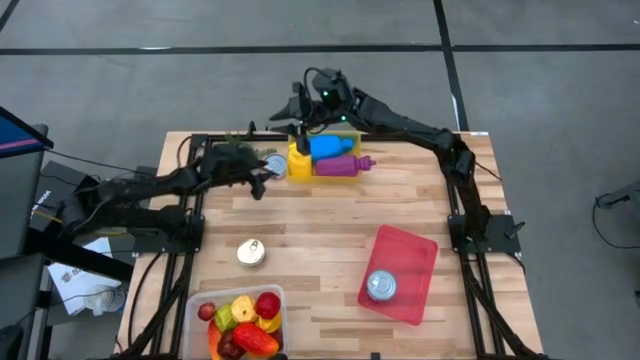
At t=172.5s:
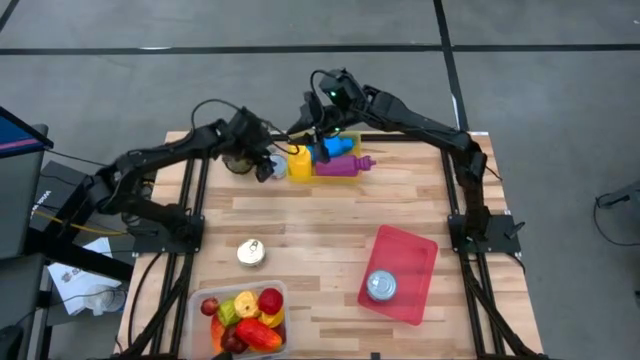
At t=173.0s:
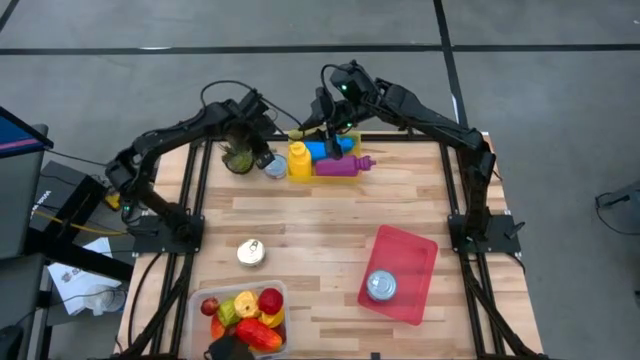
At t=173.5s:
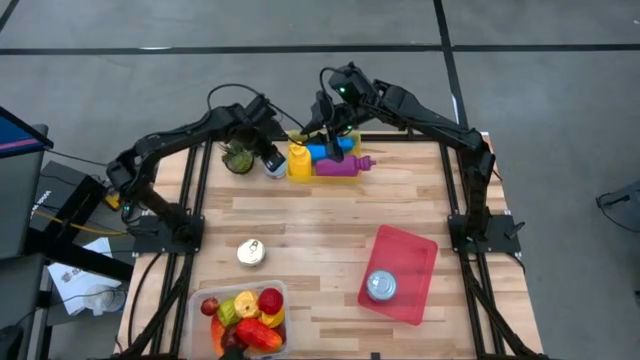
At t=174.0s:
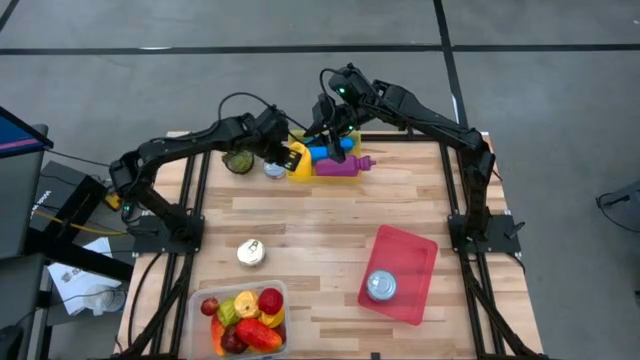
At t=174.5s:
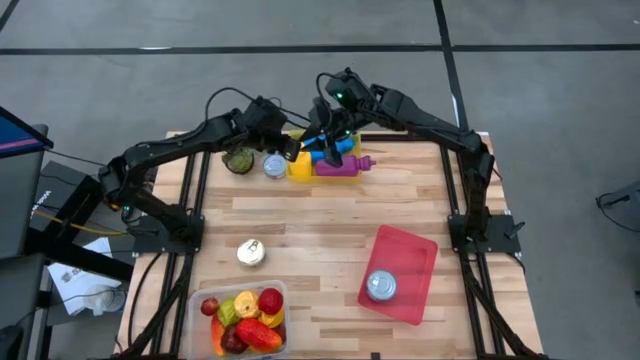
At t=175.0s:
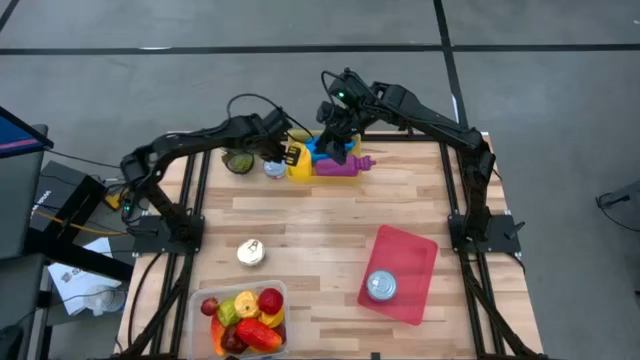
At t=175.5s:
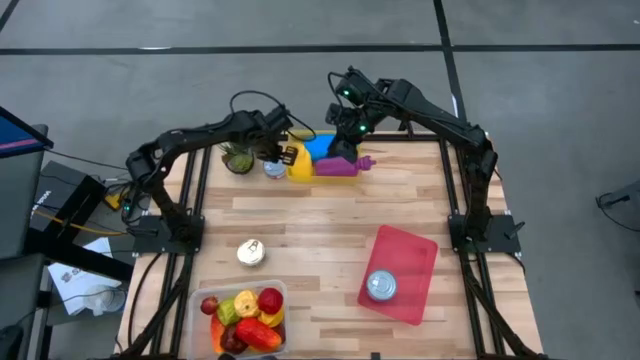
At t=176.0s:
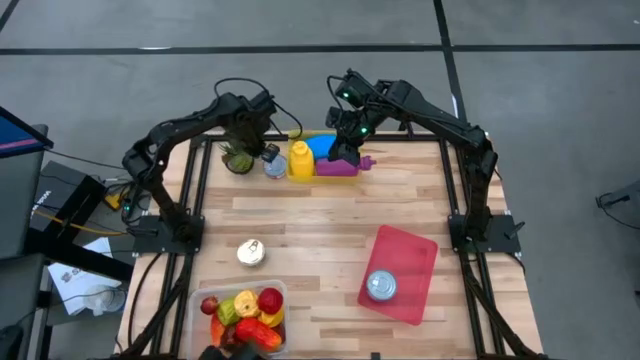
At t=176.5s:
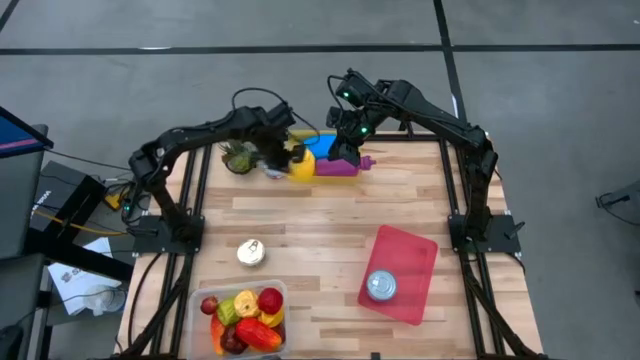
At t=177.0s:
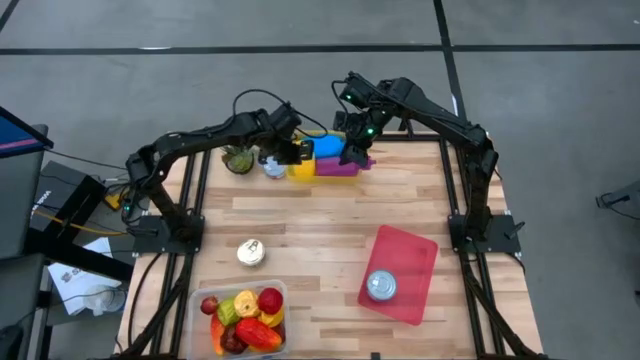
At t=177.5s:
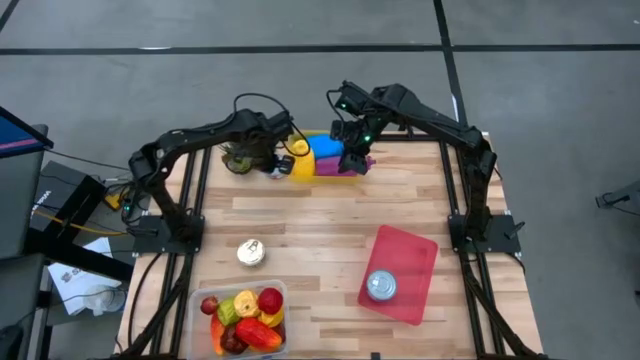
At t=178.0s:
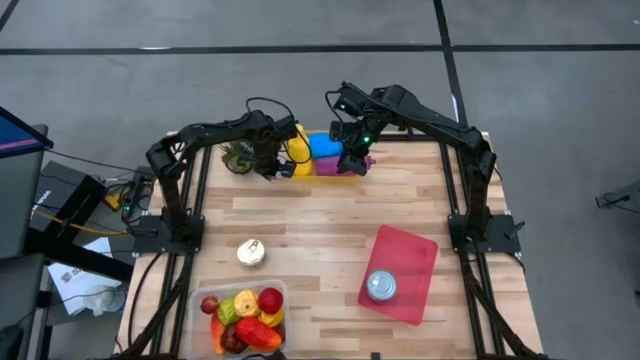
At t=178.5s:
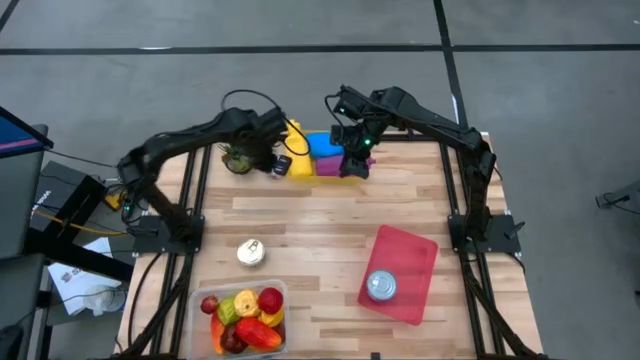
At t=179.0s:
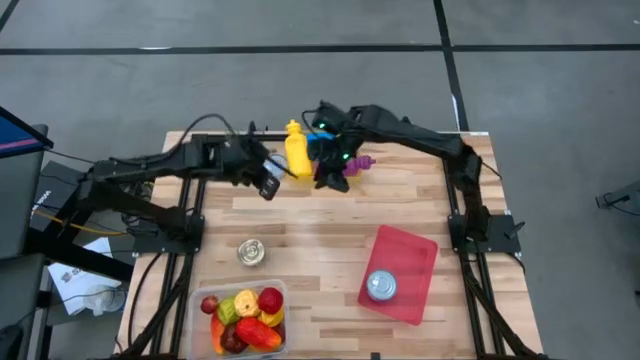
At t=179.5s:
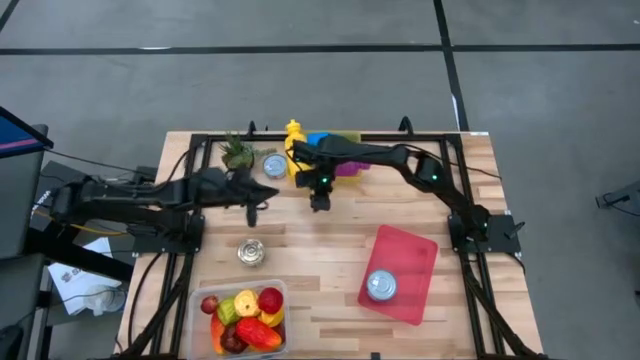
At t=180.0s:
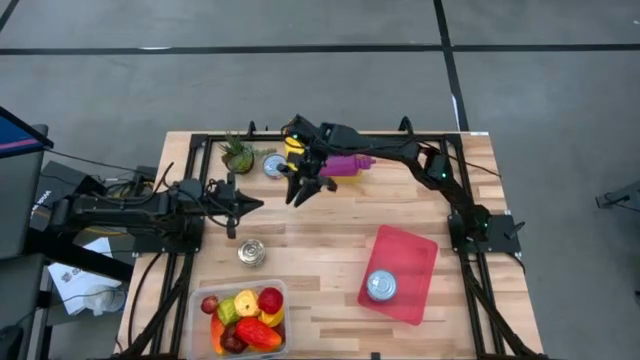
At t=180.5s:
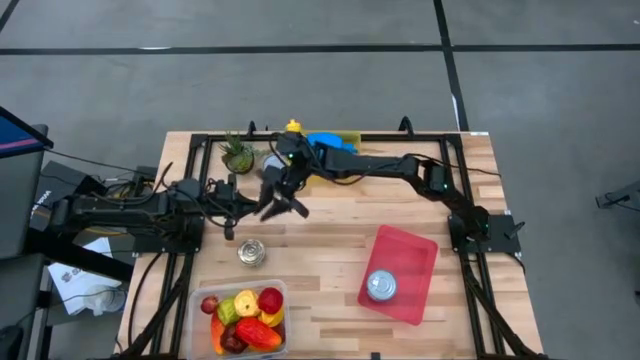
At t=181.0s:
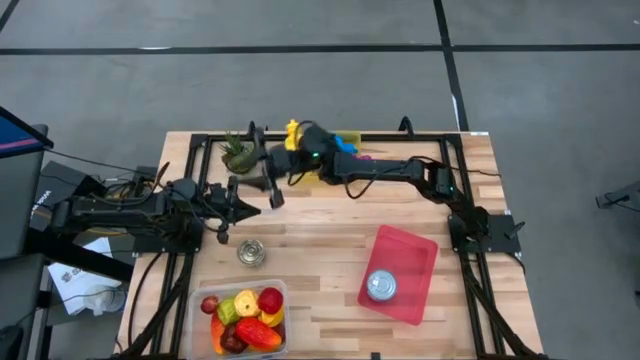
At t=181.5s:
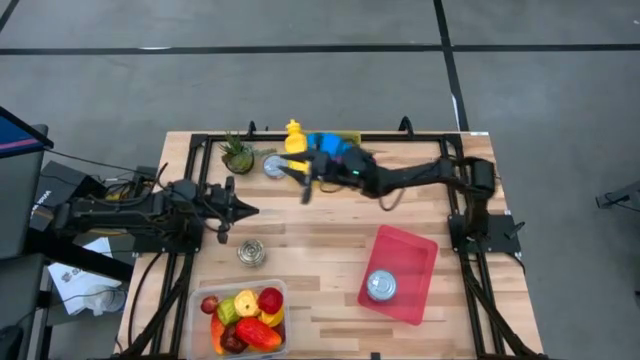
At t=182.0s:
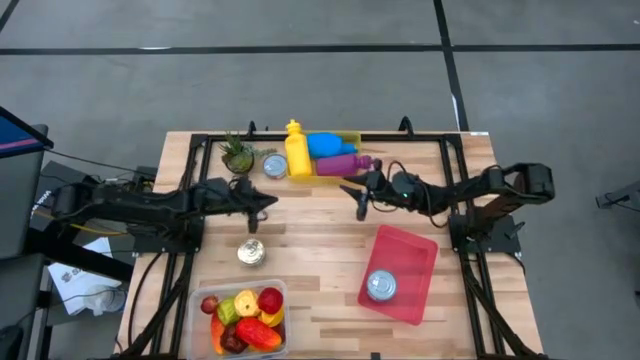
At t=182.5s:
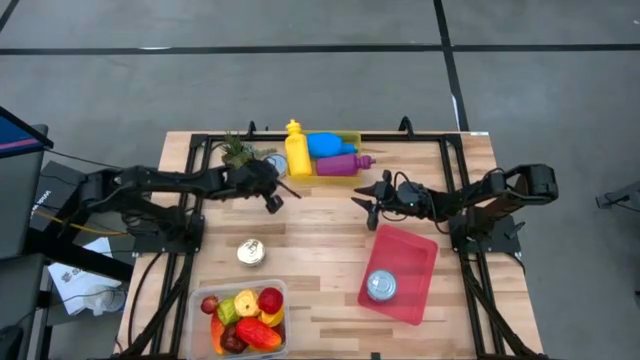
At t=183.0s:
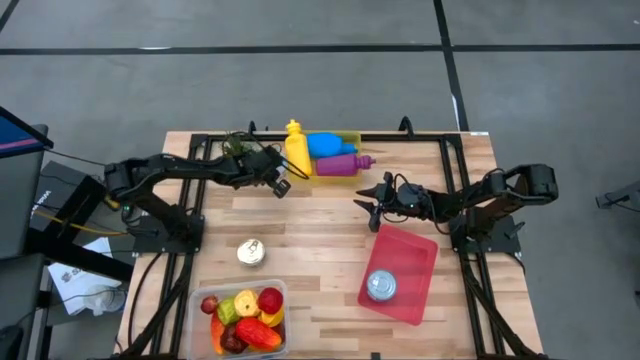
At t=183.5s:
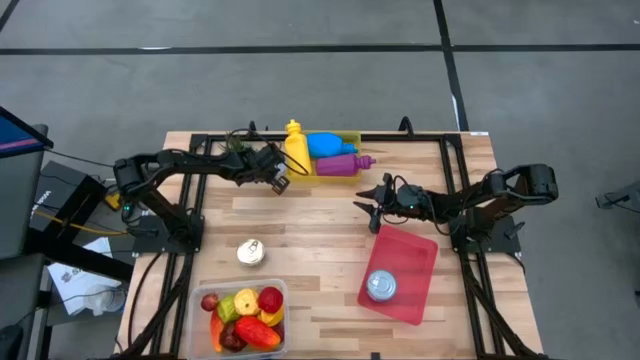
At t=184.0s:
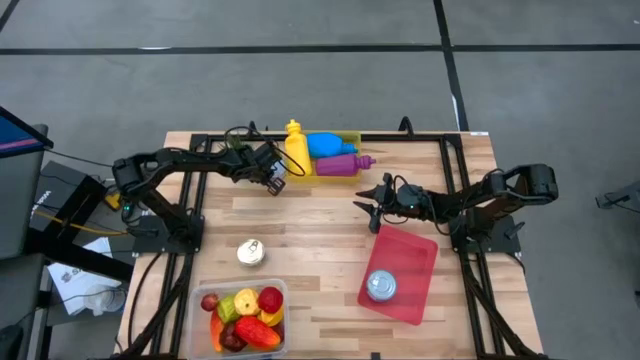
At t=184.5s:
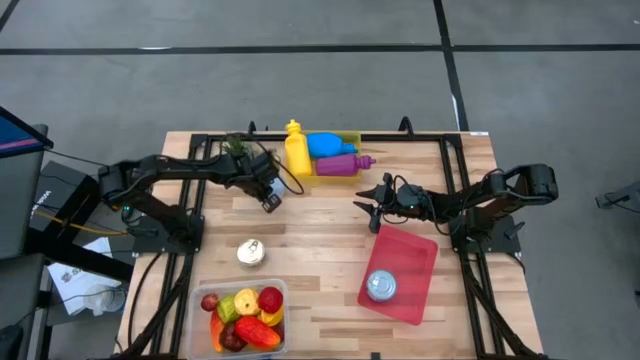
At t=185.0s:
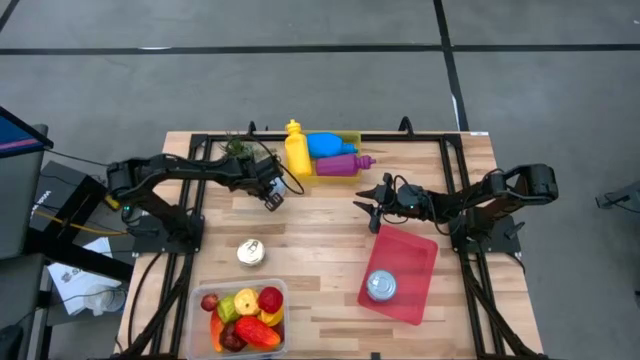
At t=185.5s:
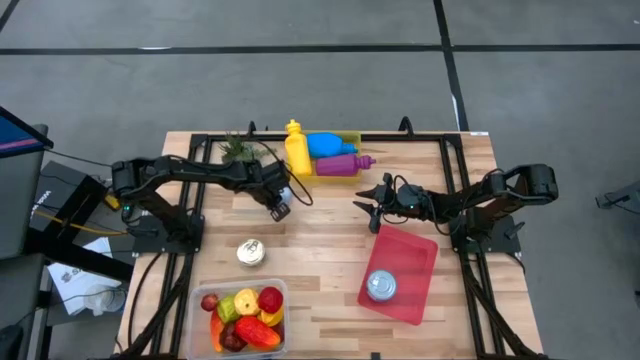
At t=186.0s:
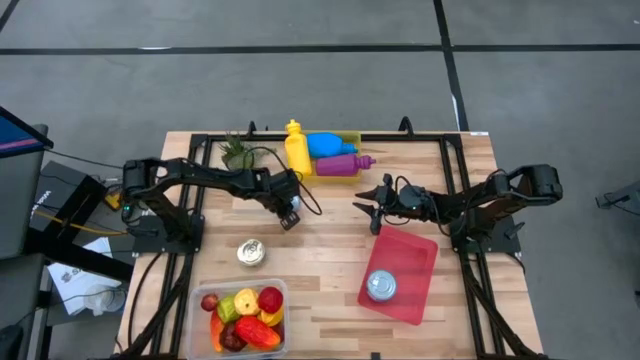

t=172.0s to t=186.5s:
Task: Pick & Place Food Item
Put the red tuna can into the red bin

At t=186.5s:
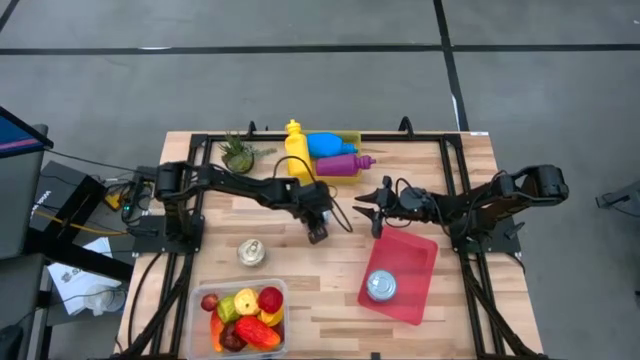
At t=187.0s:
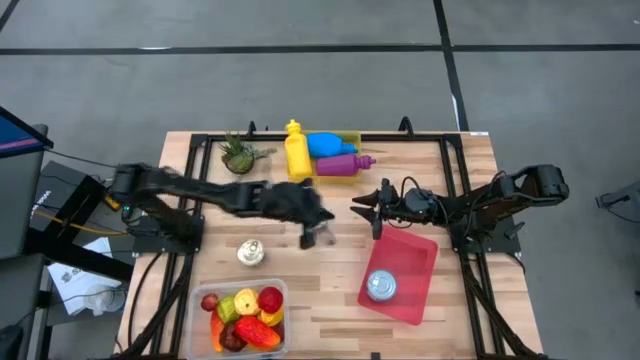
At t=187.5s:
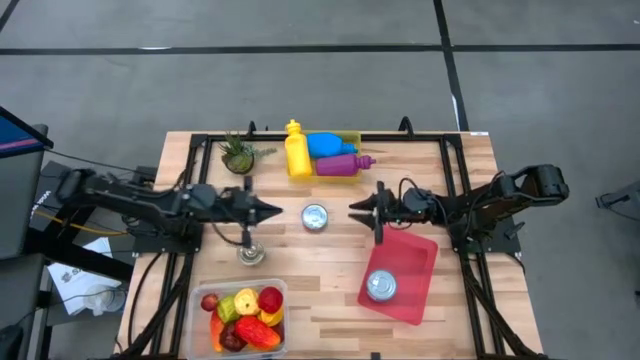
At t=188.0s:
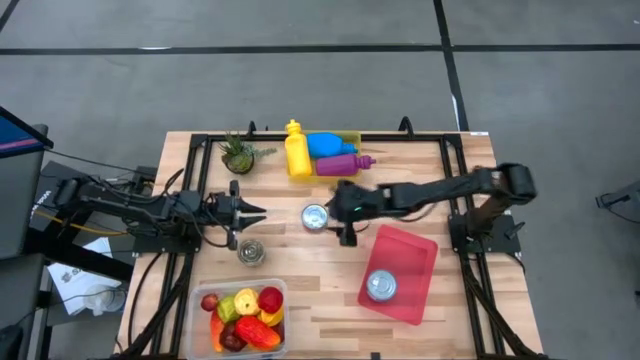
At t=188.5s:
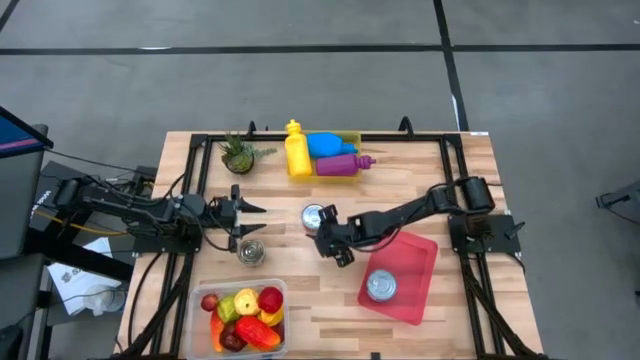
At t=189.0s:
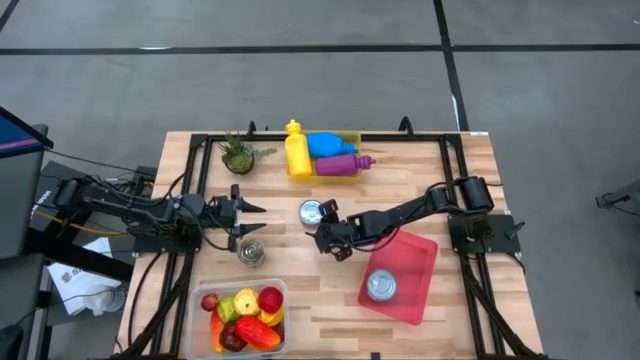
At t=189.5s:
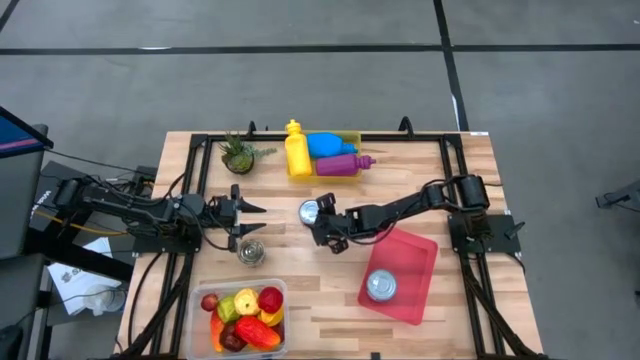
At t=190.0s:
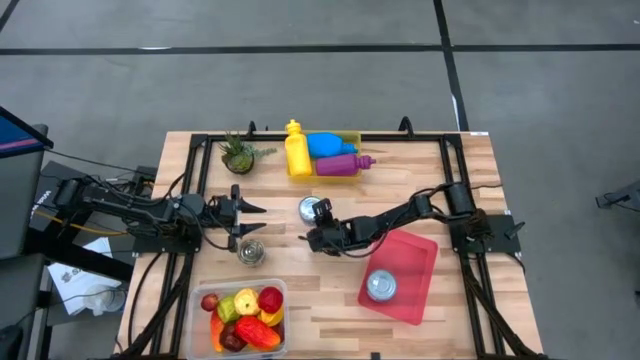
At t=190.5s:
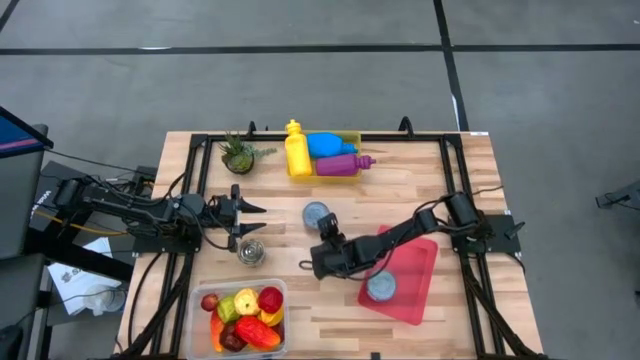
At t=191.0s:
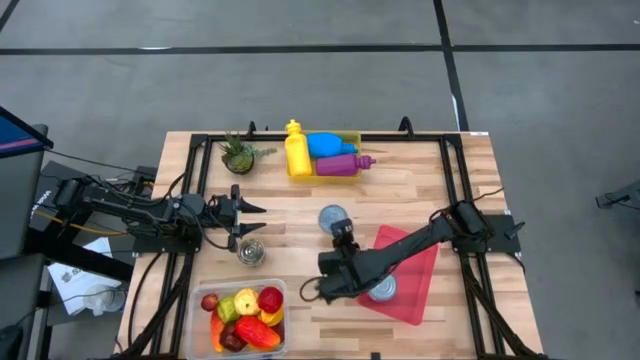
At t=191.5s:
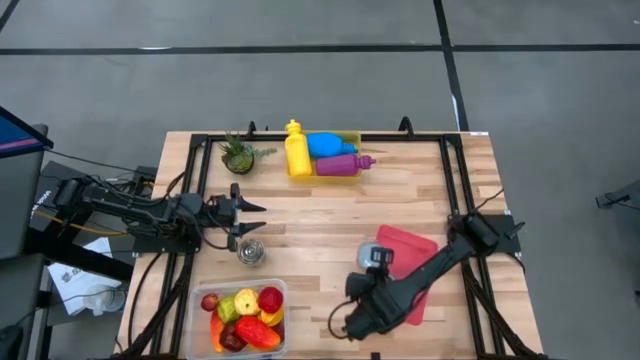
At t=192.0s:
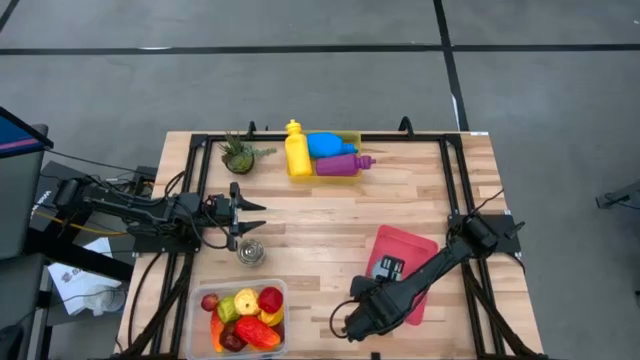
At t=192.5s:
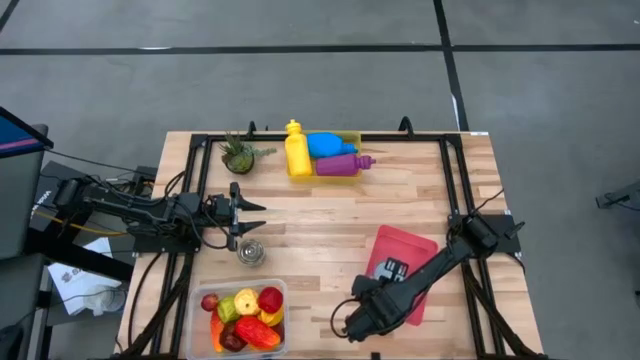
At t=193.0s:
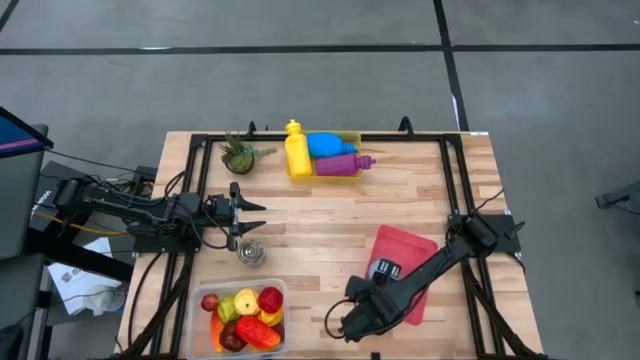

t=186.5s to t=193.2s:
Put the red tuna can into the red bin
